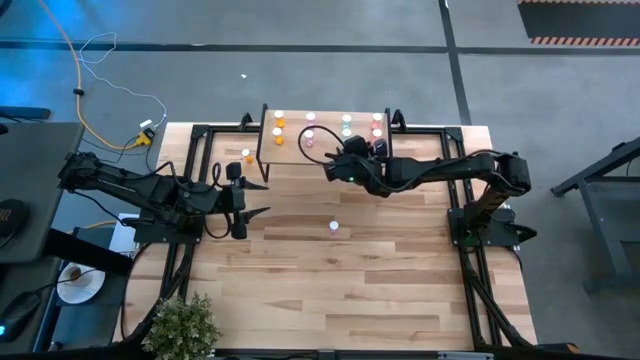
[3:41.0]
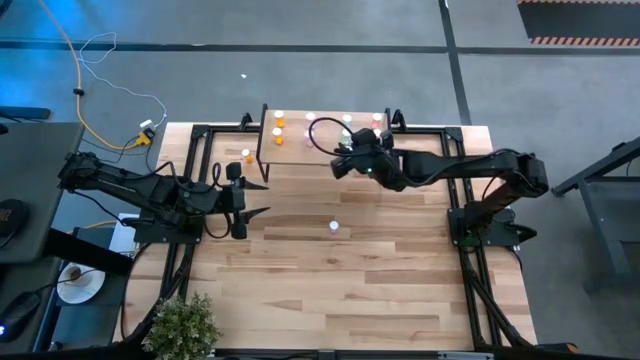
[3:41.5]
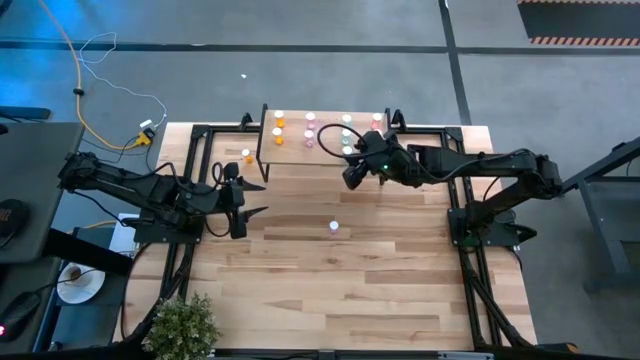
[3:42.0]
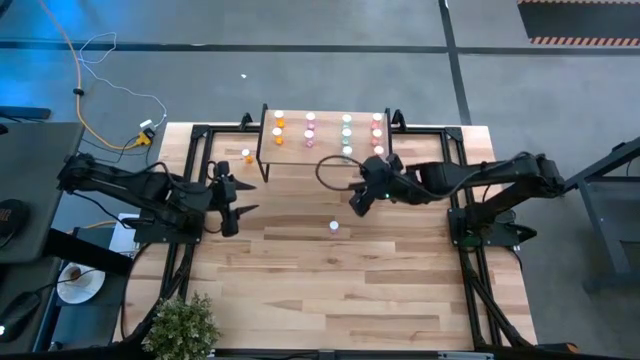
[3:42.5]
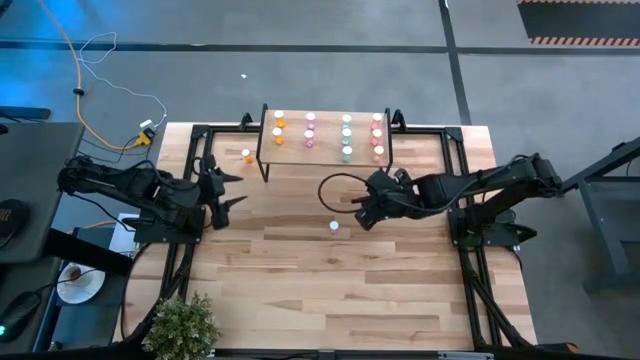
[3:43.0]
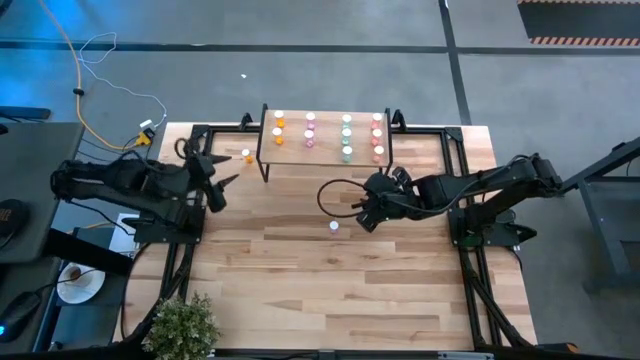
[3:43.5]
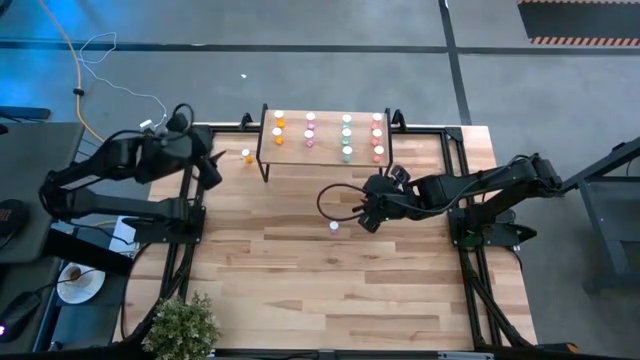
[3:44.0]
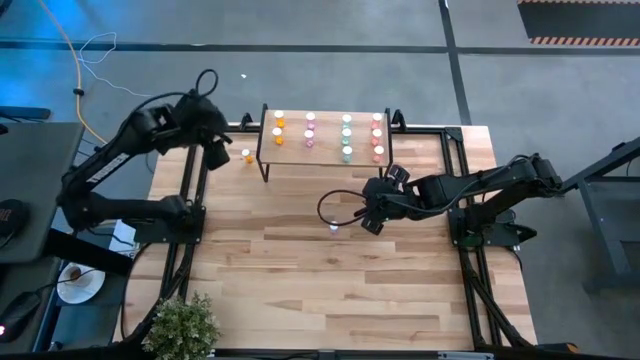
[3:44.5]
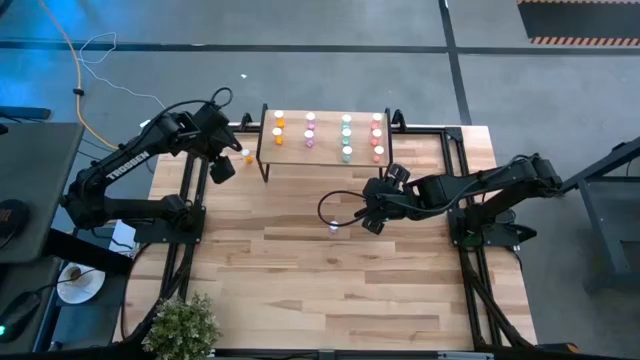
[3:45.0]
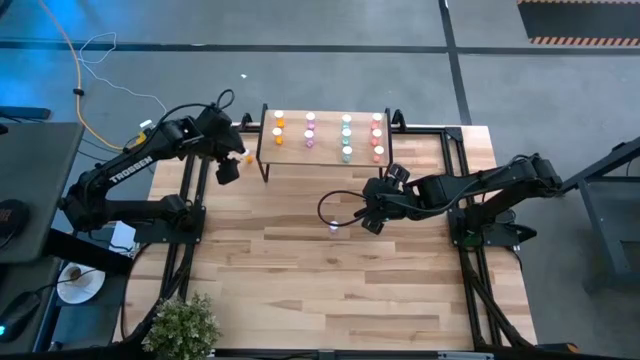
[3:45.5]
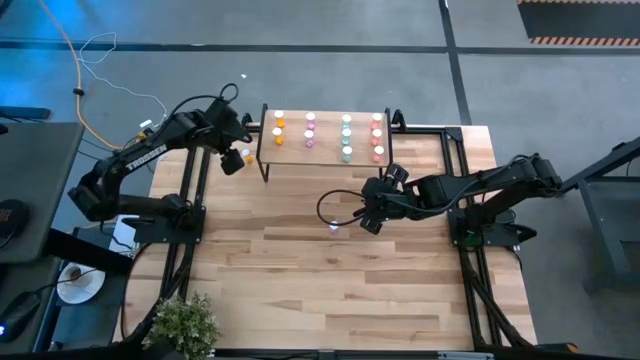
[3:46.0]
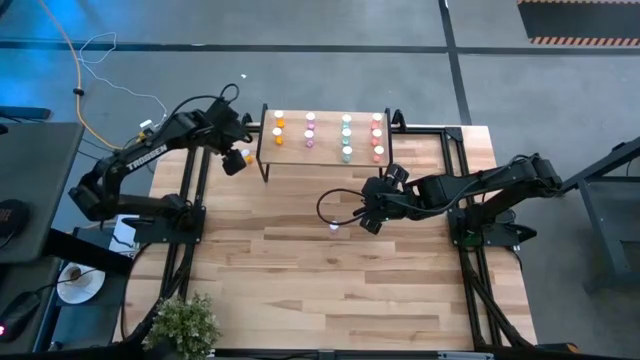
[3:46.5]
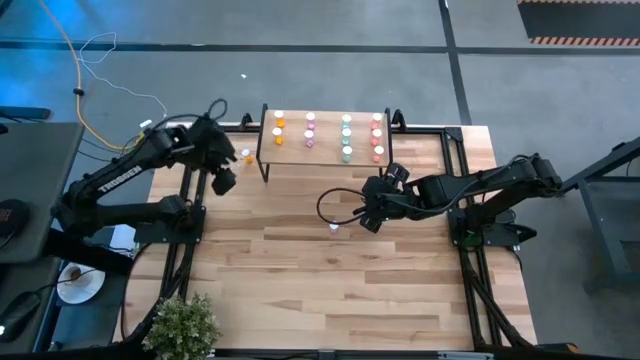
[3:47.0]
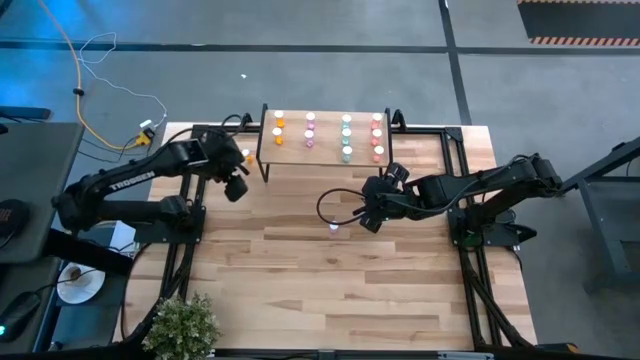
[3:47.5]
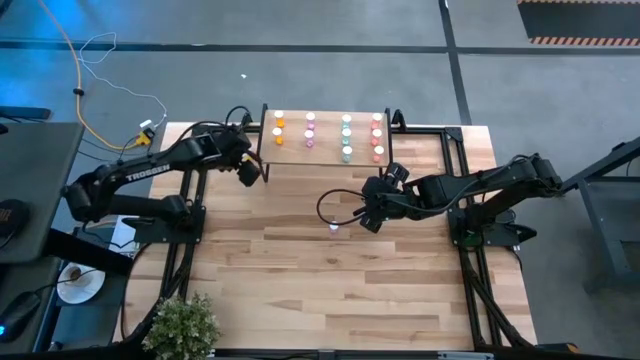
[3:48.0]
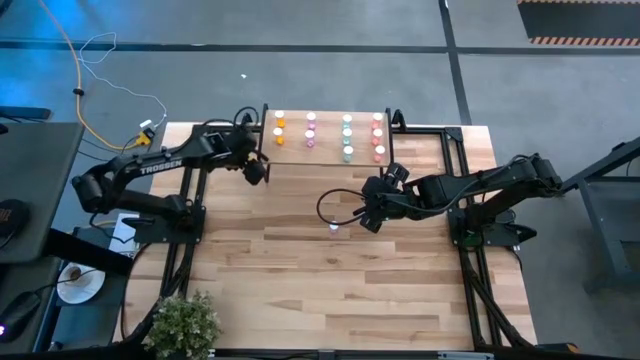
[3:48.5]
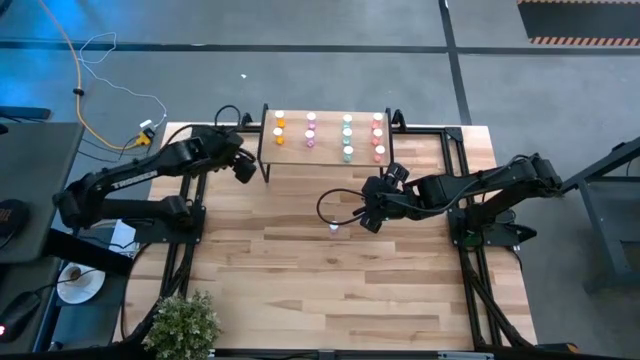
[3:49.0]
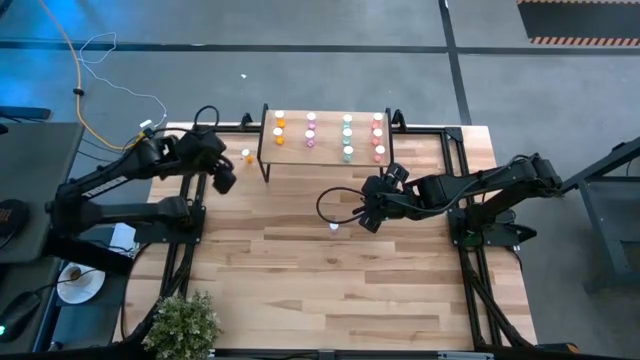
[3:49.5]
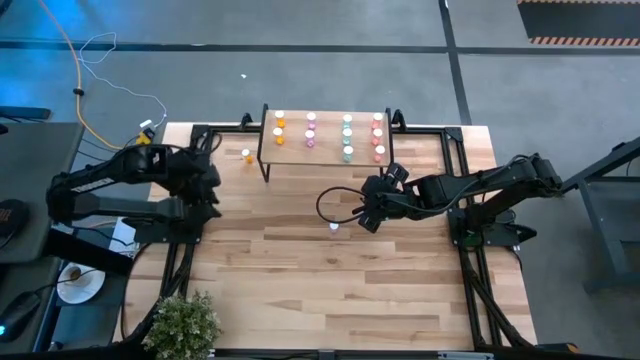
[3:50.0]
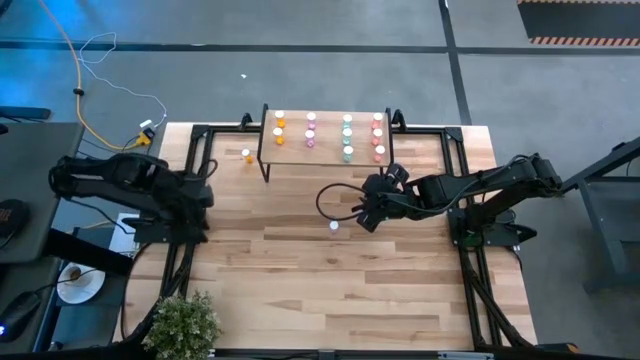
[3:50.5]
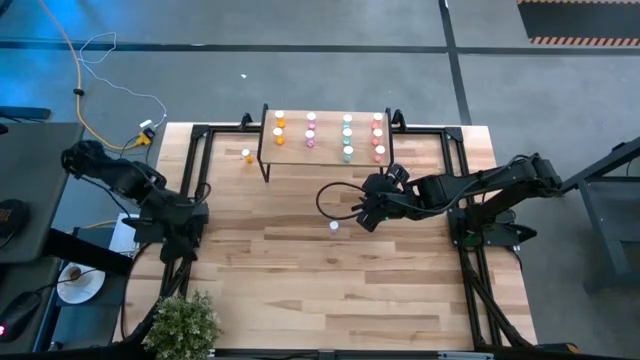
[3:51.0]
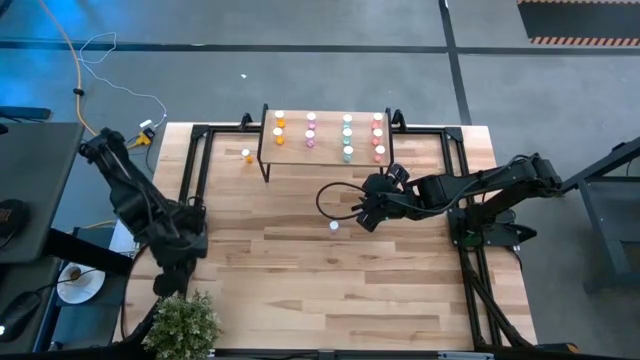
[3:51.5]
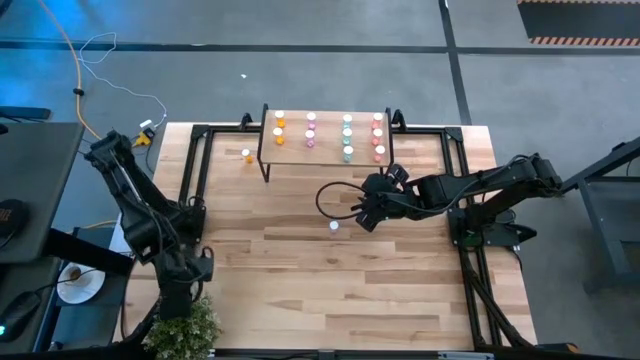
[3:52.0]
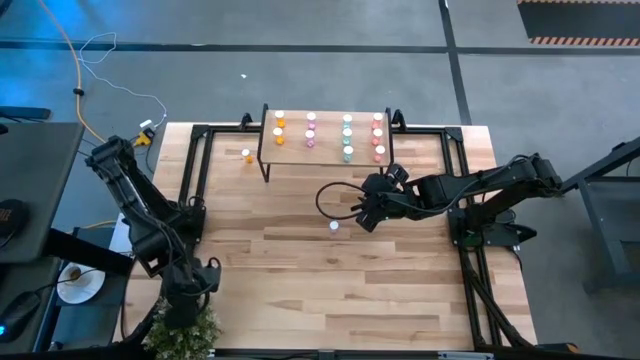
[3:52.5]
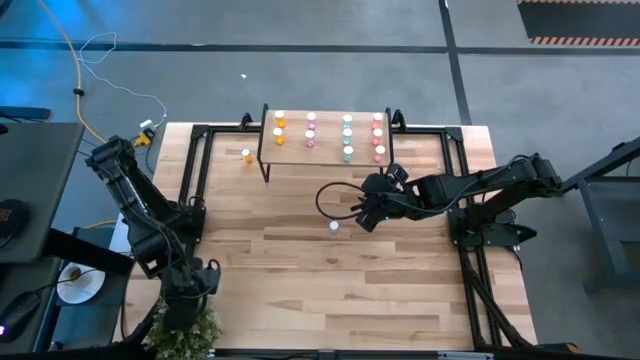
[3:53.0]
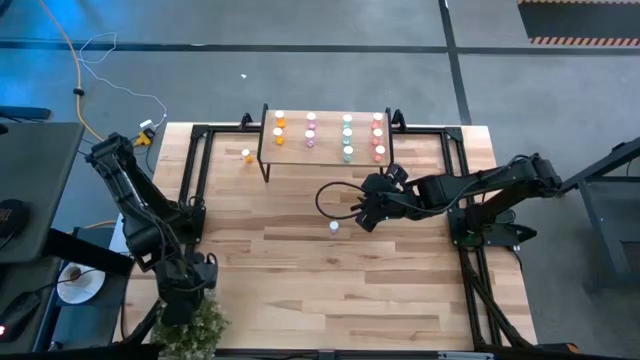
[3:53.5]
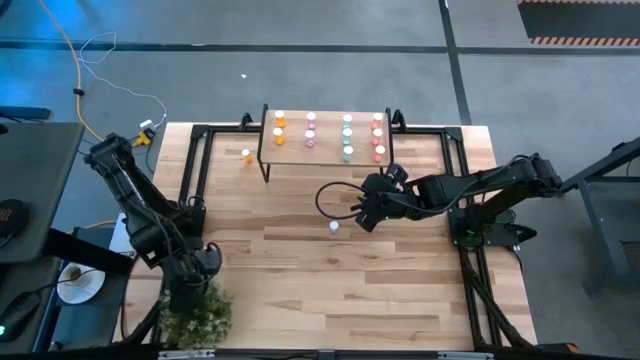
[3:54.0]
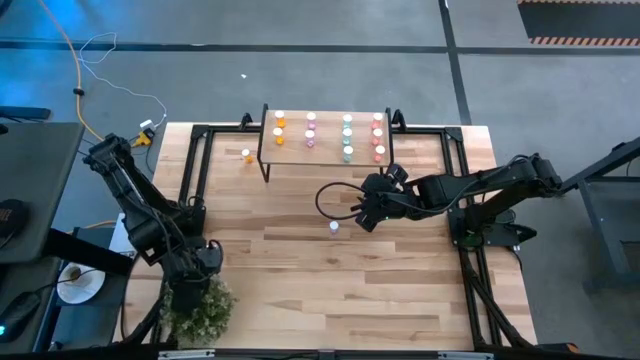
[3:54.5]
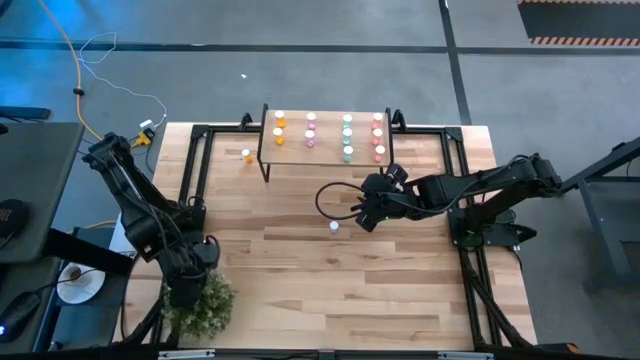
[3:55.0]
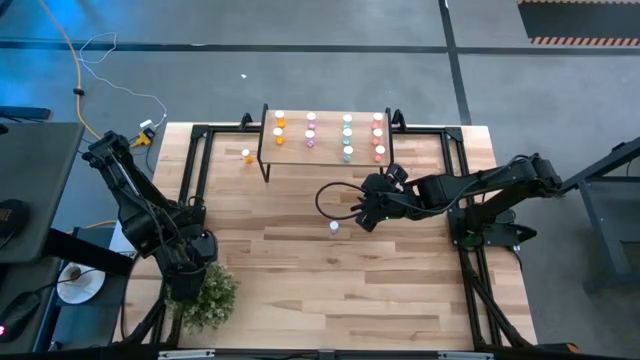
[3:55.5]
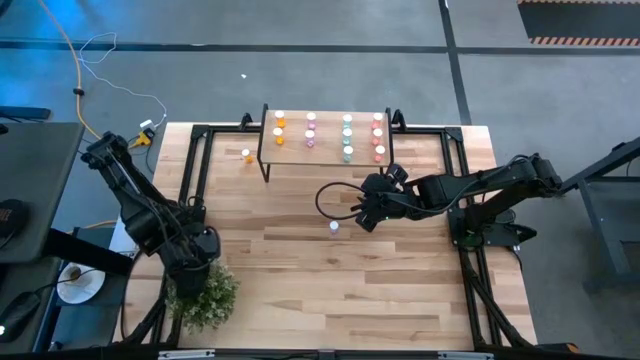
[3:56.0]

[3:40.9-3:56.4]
Task: Pick and place medicine bottles onto shelf by color
Adjust the plant on the table

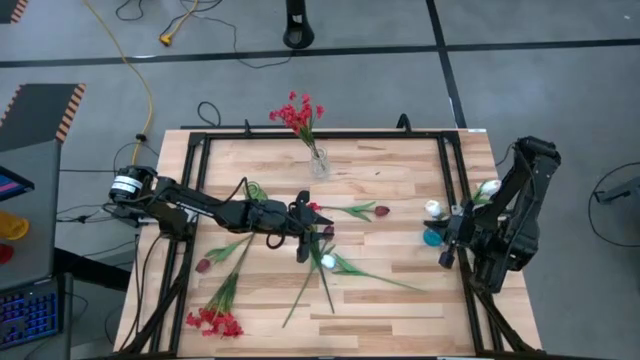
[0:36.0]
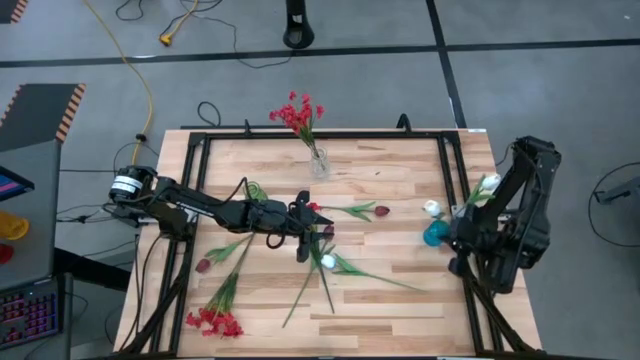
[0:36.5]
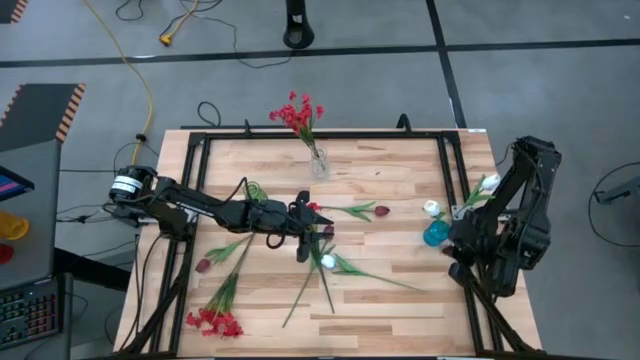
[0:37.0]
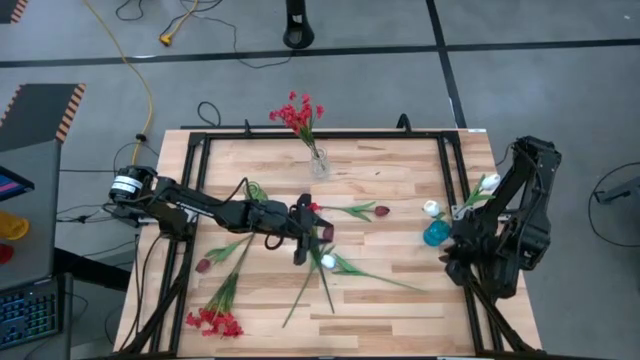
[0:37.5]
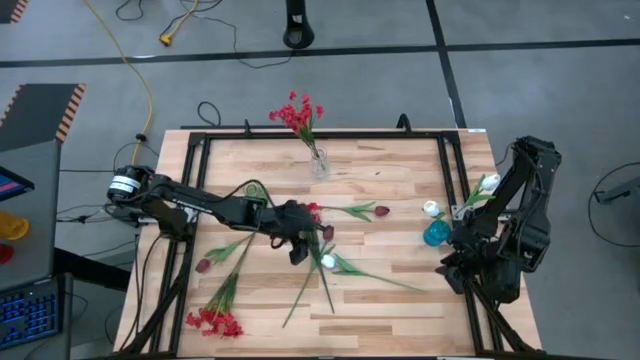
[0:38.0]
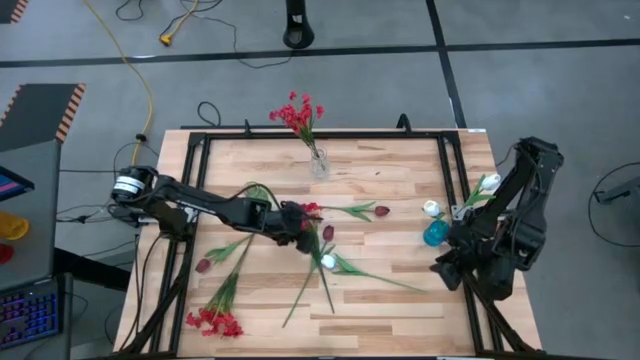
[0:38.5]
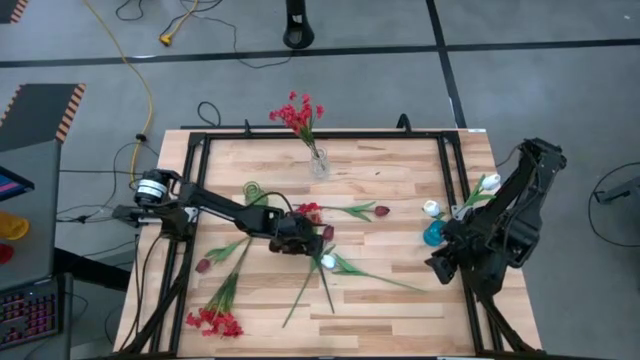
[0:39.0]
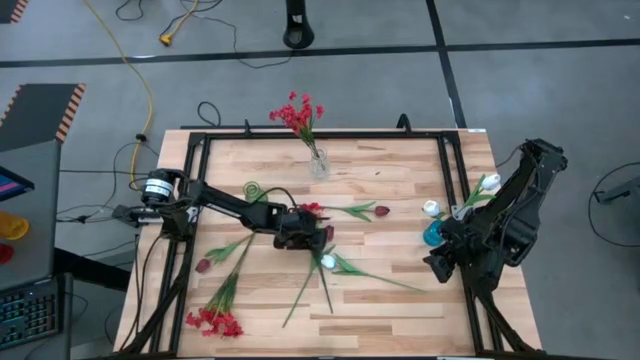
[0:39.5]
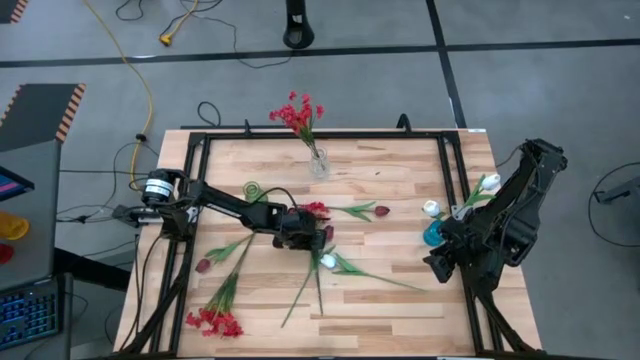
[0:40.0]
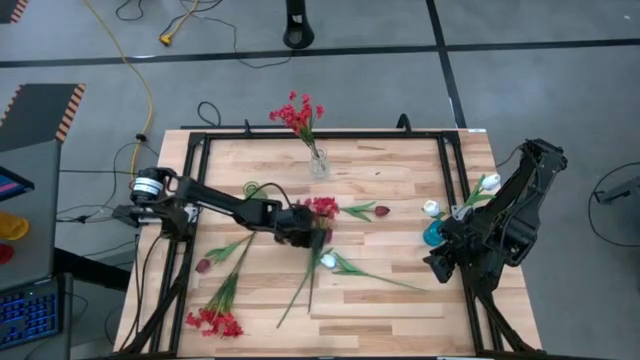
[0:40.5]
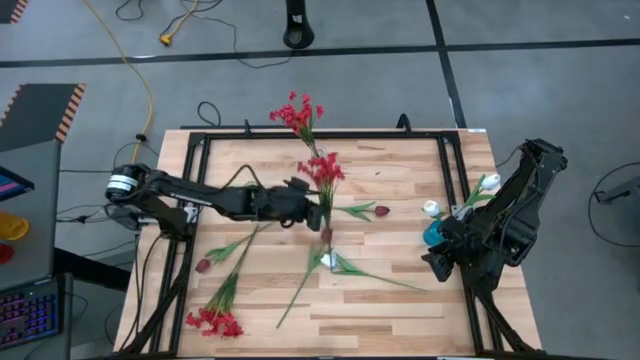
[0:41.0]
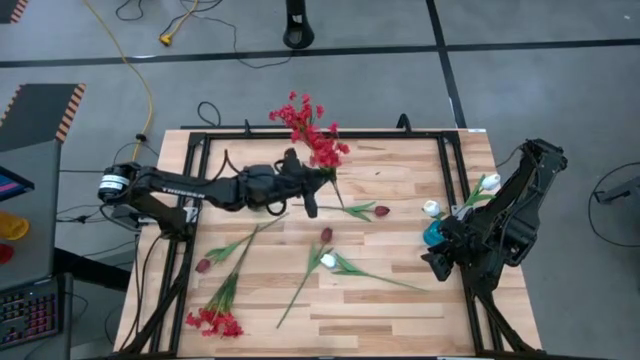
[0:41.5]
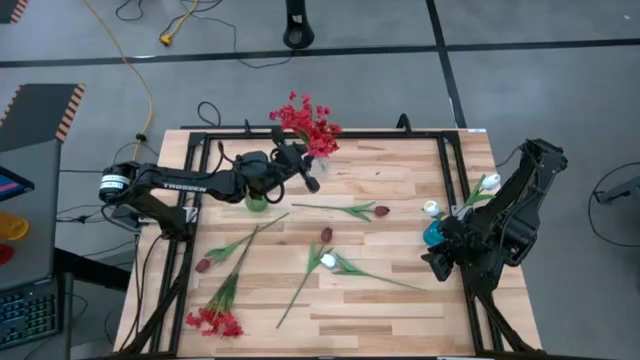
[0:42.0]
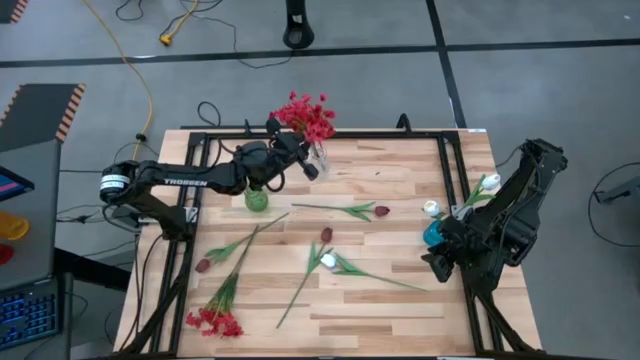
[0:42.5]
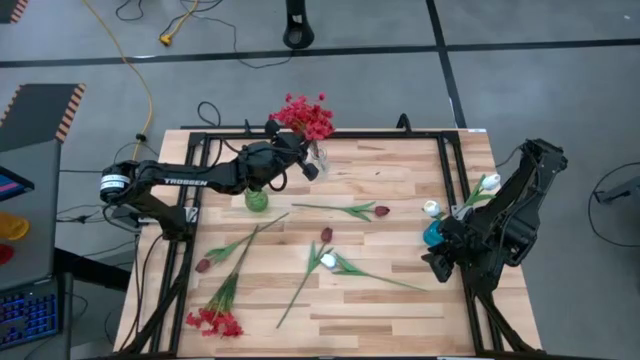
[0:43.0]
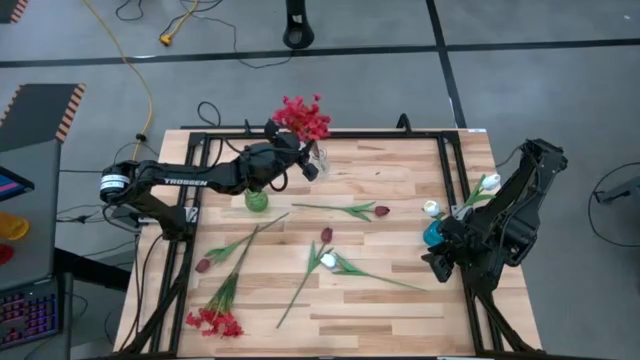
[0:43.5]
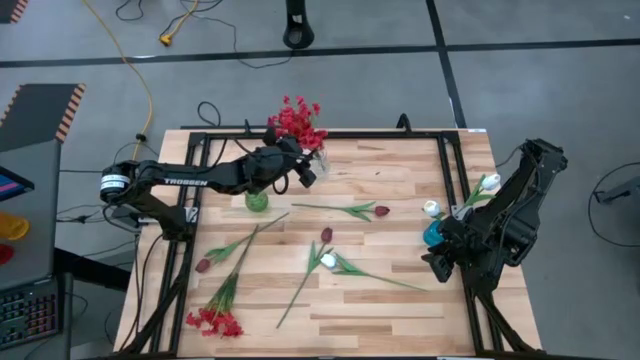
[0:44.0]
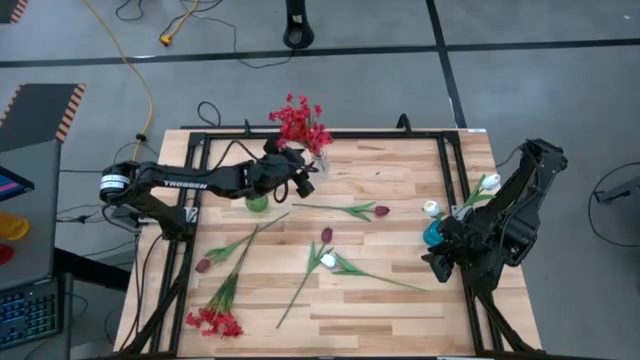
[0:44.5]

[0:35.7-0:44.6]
Task: Sort flowers into vase by color
Put the top red flowers into the transparent vase
